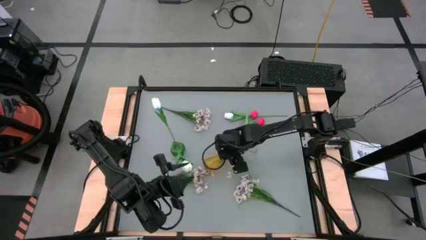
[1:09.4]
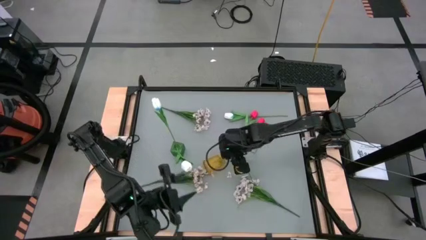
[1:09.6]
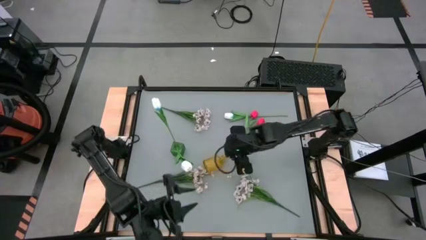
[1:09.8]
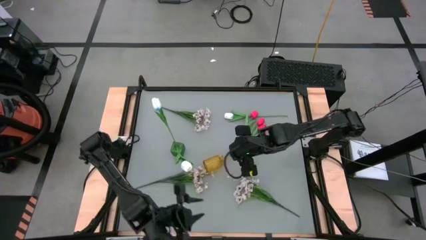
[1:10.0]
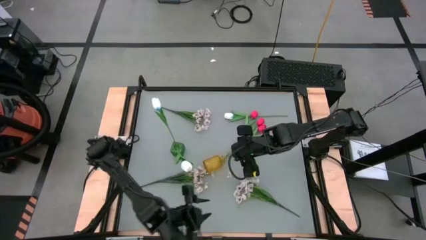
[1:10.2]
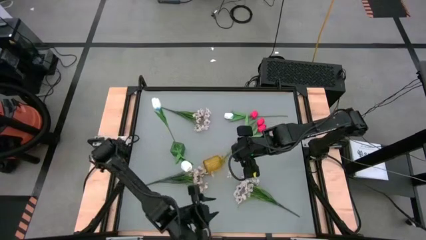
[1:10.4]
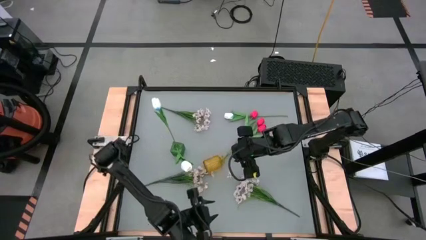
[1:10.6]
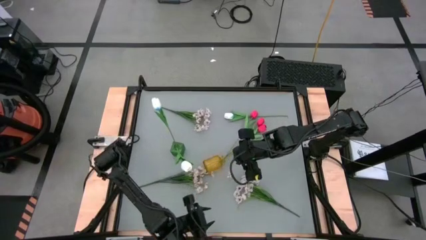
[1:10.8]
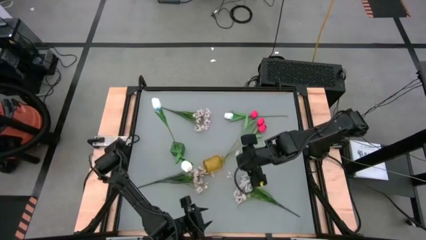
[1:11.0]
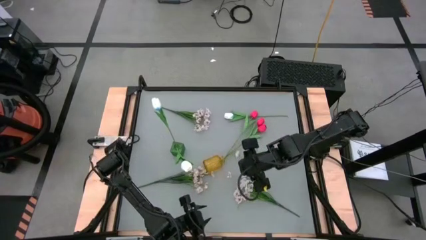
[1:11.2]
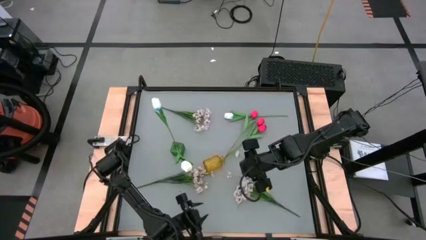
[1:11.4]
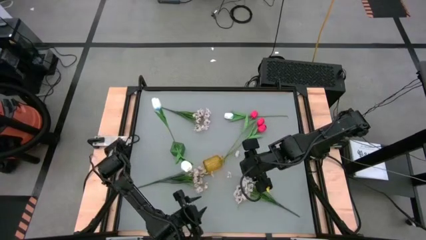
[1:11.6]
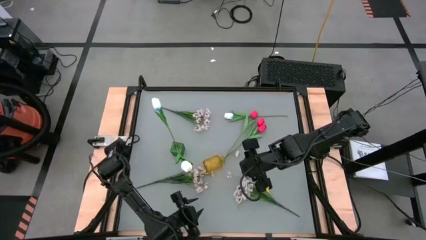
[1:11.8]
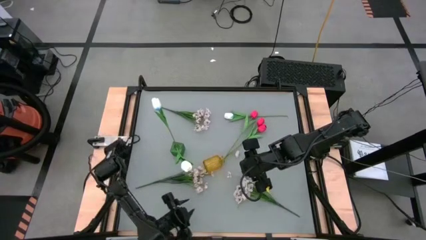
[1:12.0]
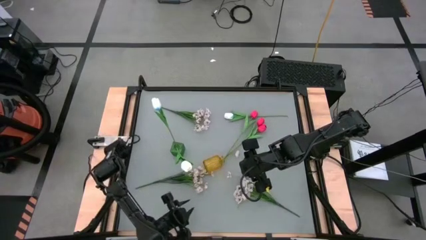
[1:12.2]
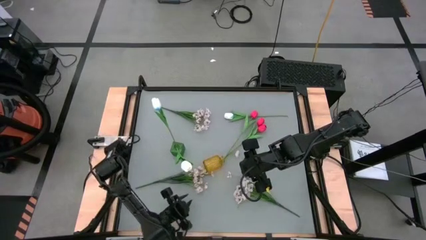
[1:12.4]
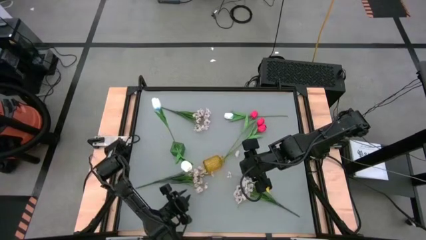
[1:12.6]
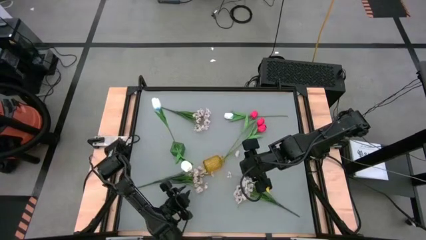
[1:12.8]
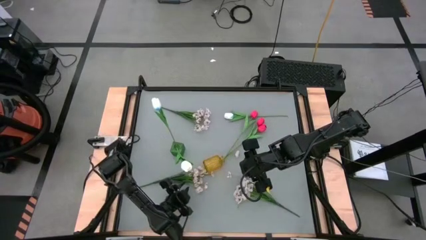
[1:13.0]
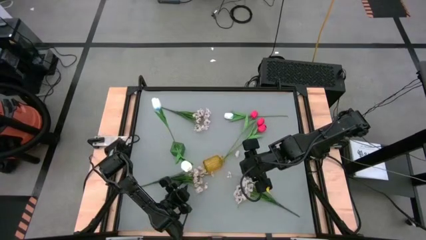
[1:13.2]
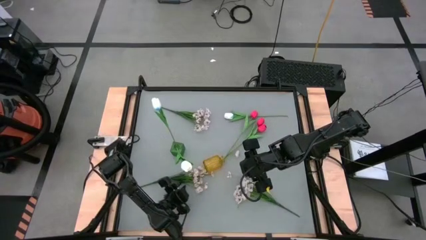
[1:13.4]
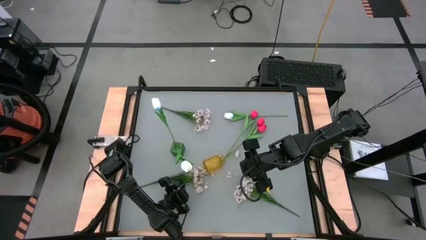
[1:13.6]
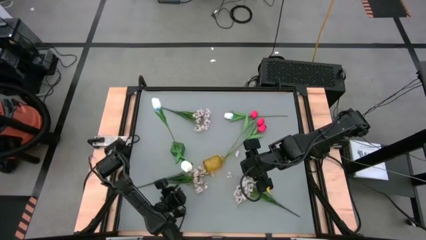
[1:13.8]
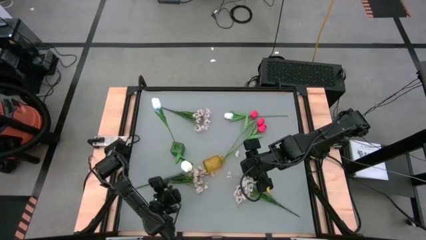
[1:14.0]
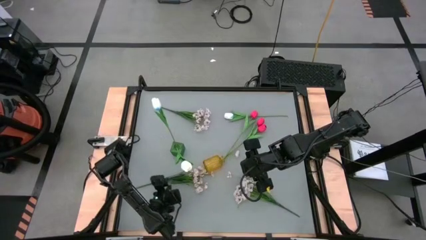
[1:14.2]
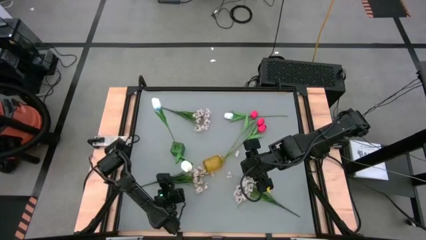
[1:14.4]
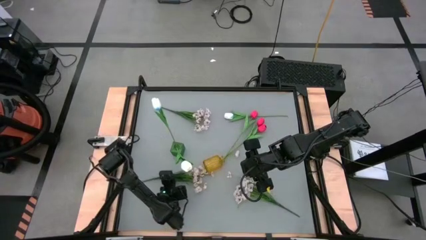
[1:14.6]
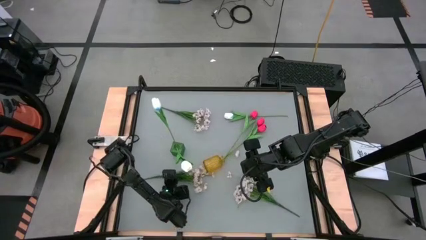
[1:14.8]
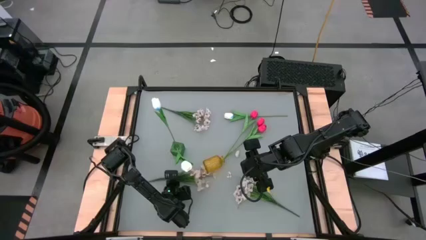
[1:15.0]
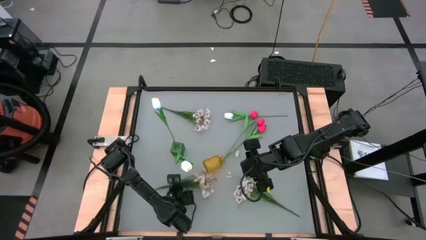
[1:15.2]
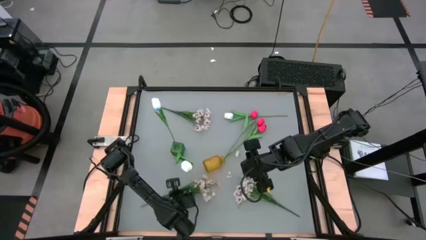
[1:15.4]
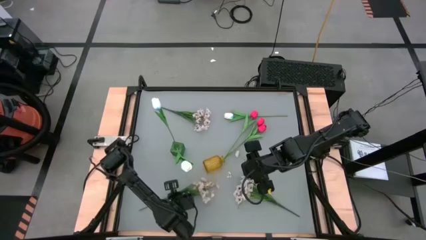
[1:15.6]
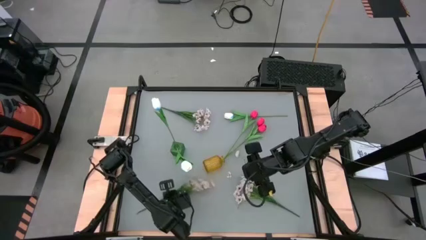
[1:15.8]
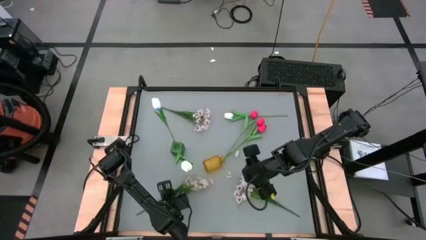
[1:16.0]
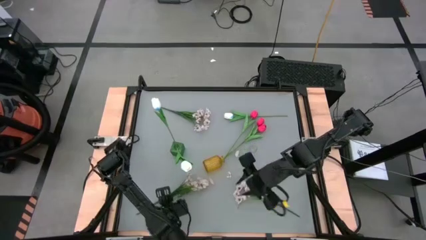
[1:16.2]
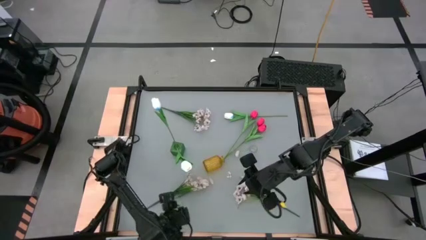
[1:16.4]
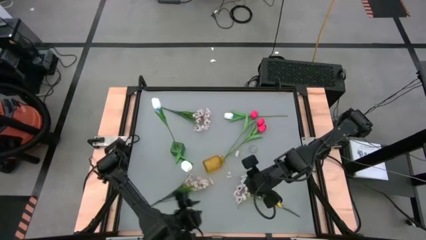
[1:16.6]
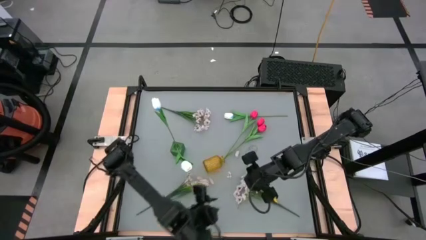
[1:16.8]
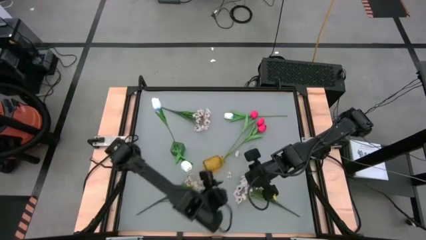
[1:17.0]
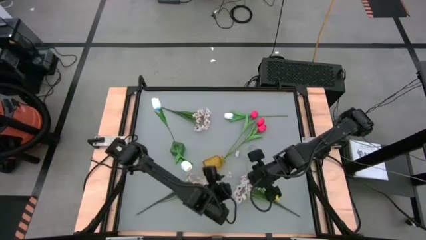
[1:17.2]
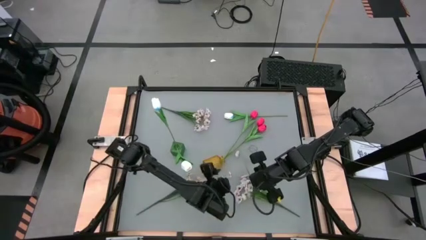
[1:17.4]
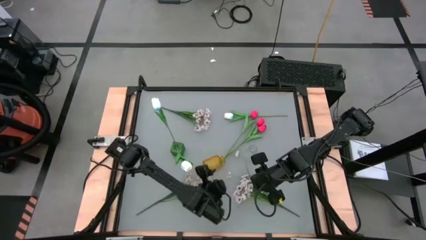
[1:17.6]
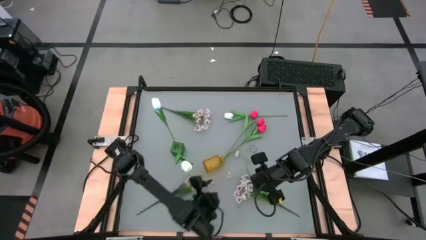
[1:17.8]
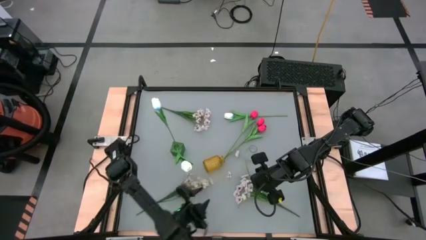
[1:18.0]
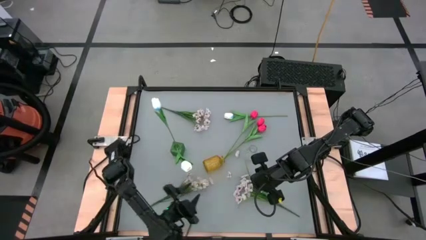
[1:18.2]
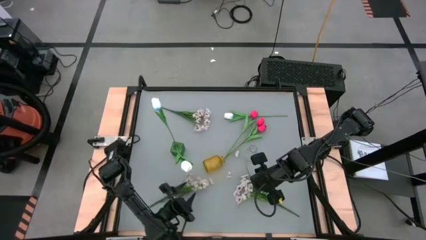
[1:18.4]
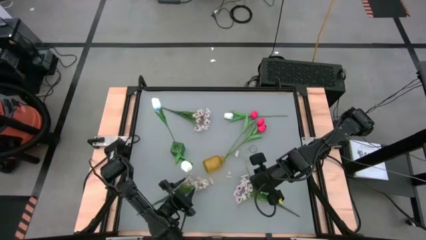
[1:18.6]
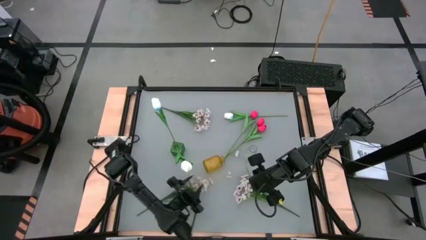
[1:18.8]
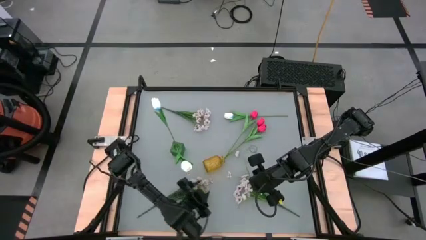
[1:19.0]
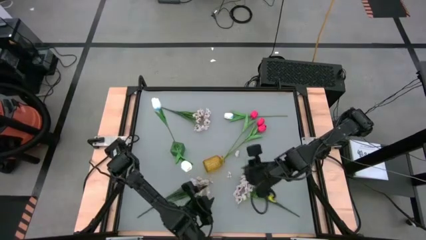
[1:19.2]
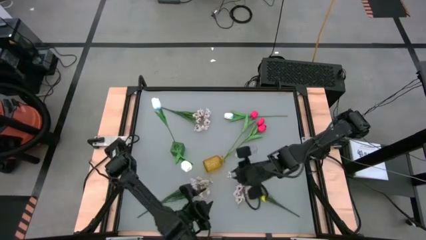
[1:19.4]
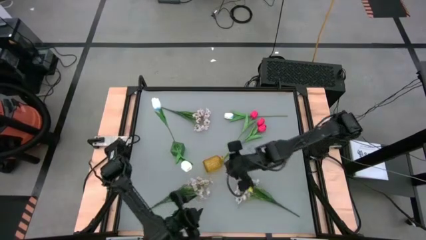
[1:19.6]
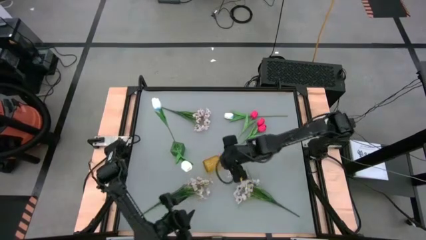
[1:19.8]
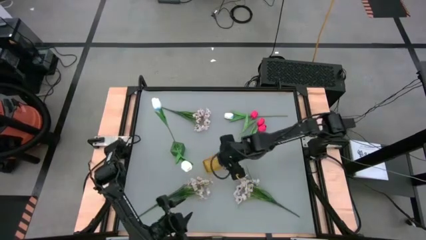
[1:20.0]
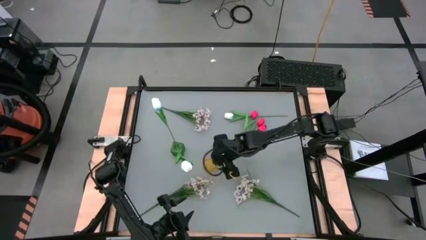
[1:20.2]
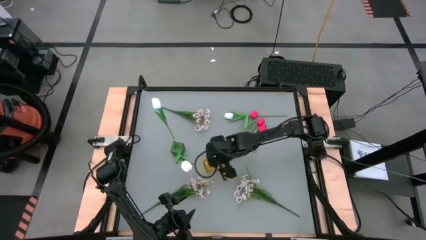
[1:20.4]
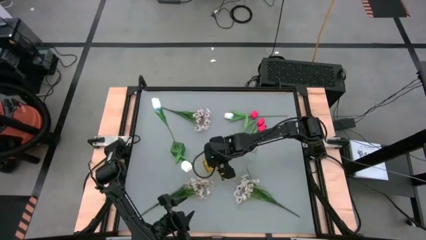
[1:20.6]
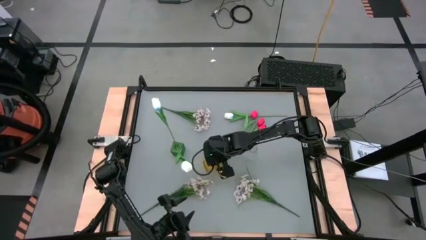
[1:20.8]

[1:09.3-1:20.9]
Task: Sort flowers into vase by color
Adjust the white flowers

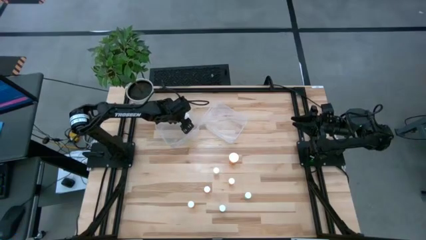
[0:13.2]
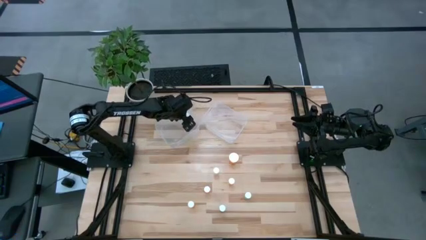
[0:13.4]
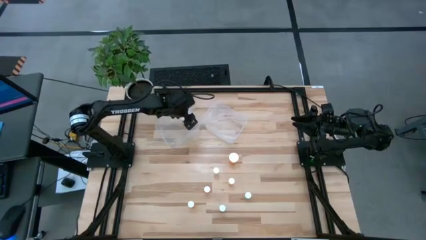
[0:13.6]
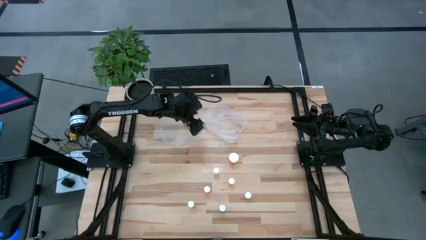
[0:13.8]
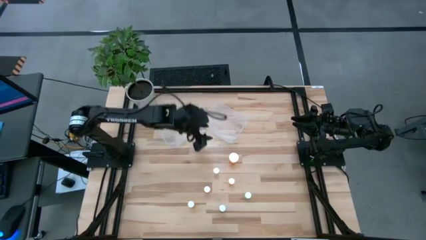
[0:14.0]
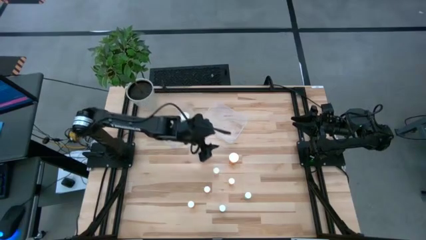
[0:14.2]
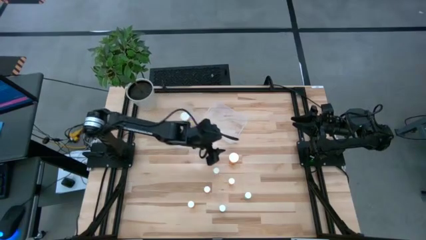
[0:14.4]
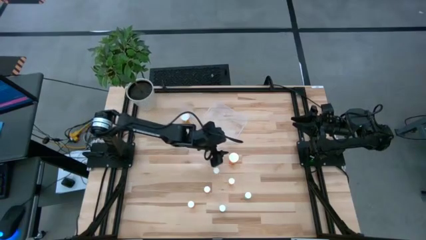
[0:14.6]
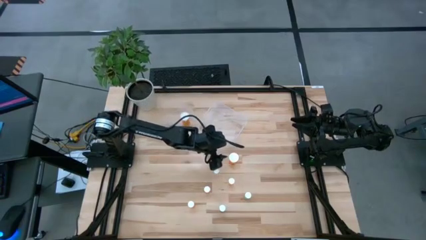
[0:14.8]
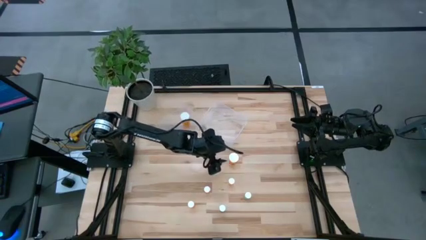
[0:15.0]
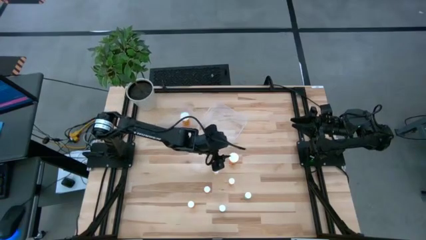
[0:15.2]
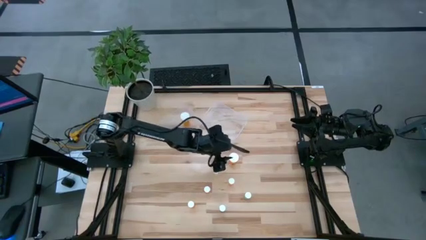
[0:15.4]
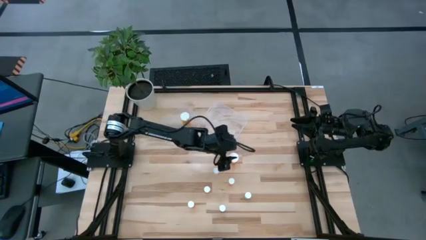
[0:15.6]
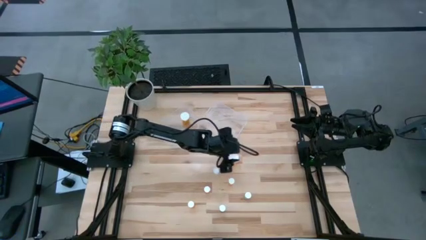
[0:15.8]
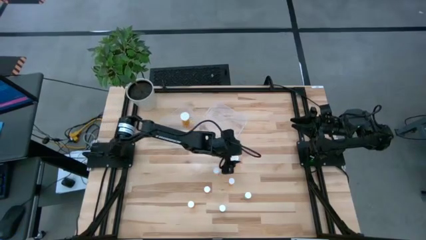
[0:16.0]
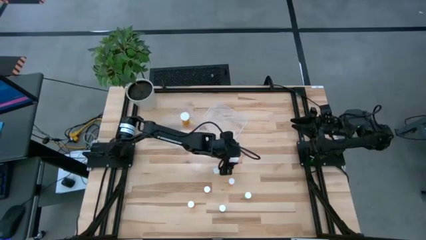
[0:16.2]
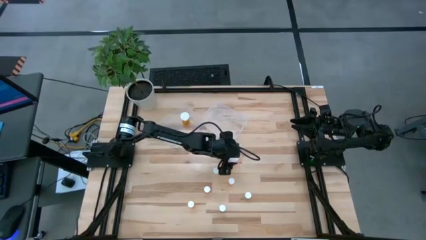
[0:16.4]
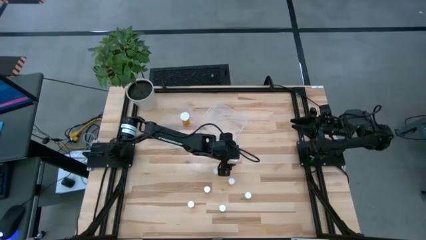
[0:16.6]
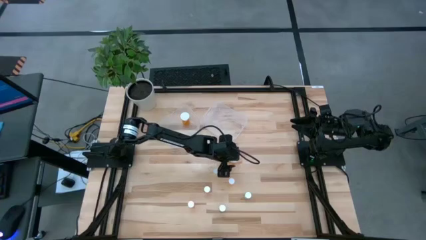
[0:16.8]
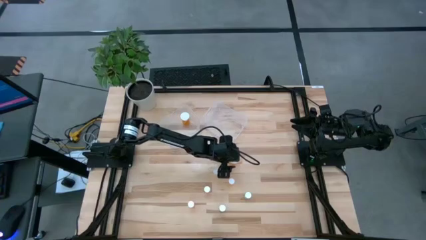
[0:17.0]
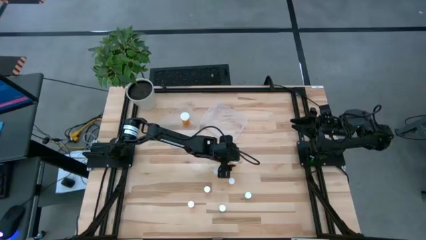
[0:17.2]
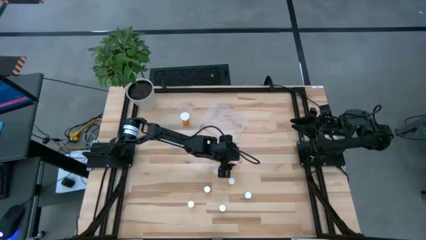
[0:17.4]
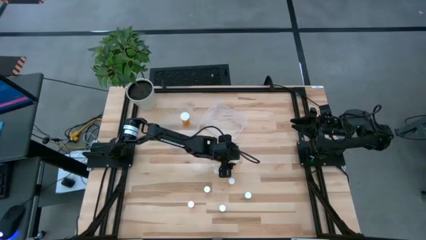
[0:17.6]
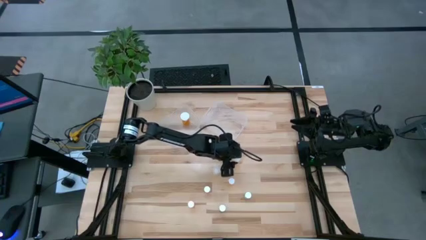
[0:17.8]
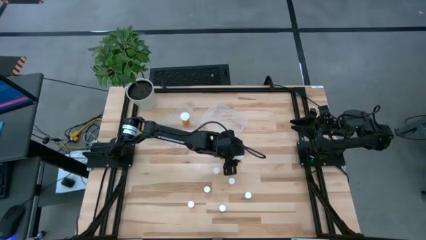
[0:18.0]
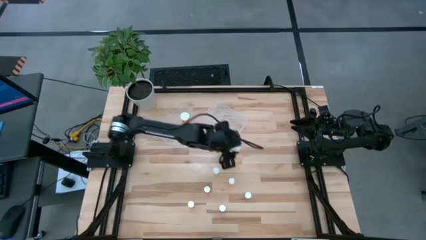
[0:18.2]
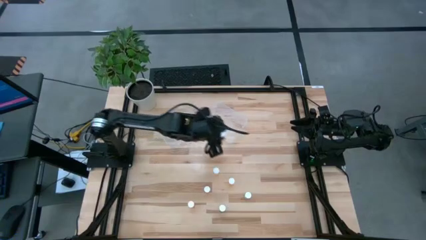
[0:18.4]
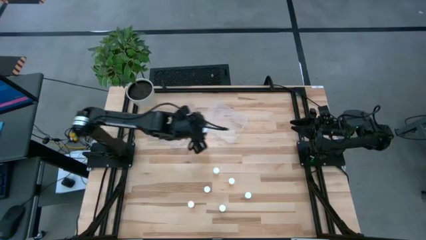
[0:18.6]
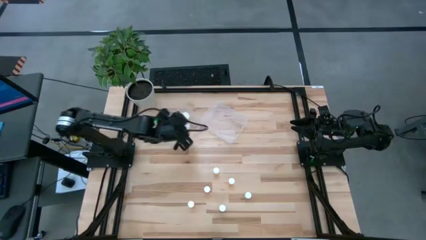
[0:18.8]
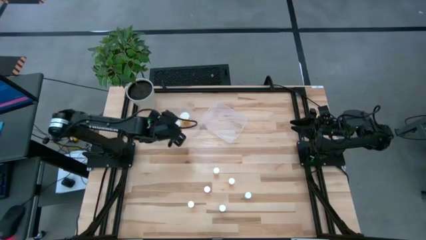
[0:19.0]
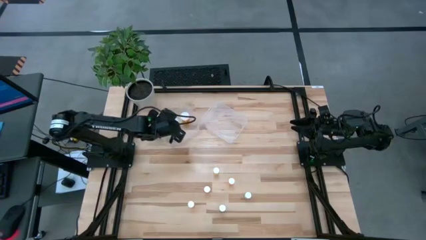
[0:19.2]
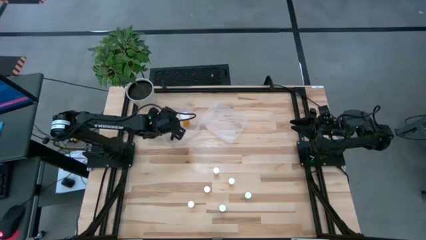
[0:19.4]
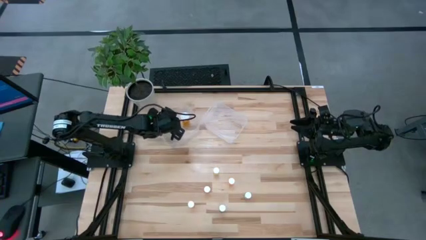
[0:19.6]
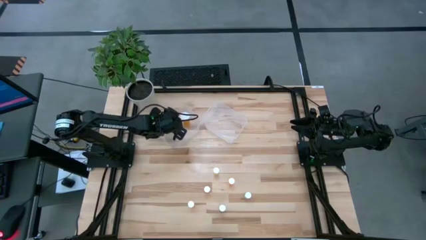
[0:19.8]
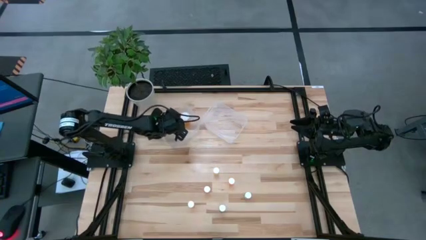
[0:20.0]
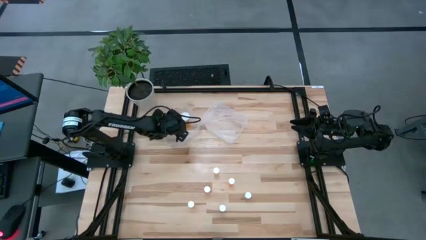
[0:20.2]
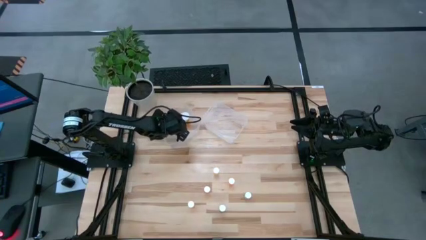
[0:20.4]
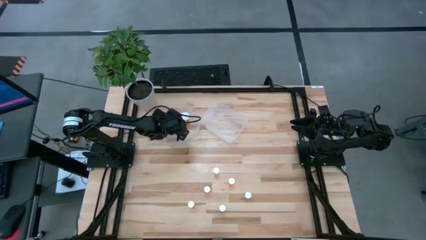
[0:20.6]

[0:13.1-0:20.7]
Task: Pick and place medicine bottles into bin by pill shape (circle, oval)
Put the big orange capsule bottle into the left transparent bin
